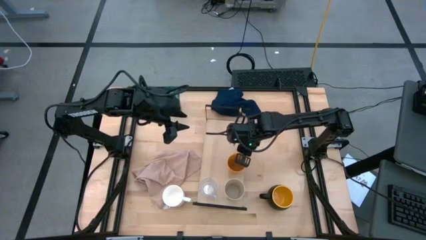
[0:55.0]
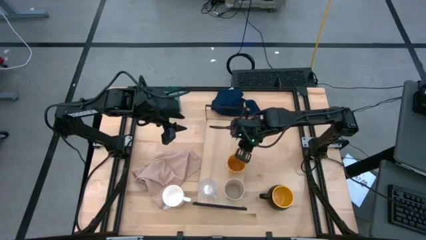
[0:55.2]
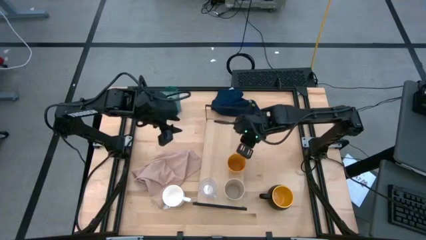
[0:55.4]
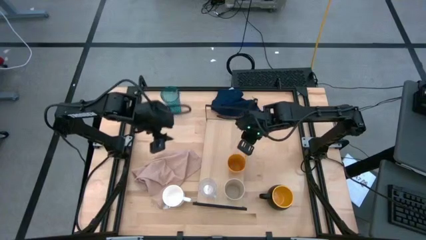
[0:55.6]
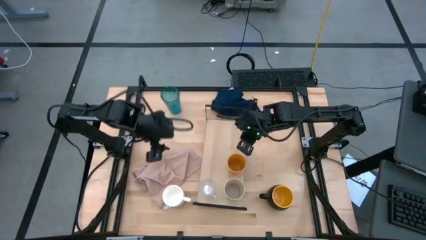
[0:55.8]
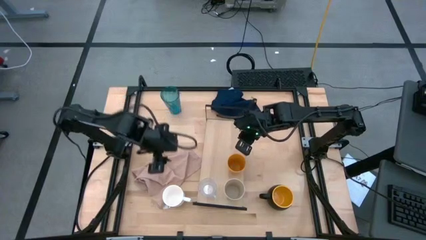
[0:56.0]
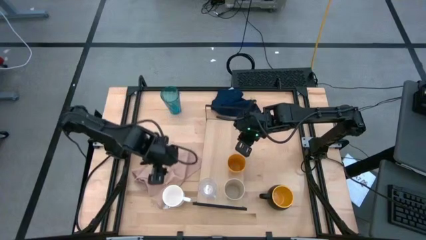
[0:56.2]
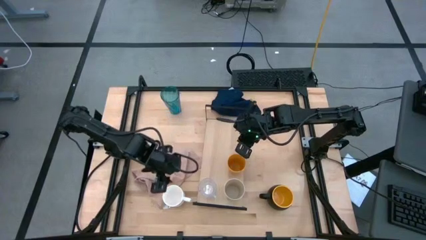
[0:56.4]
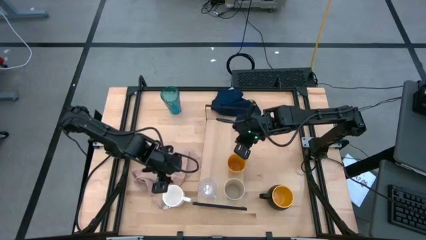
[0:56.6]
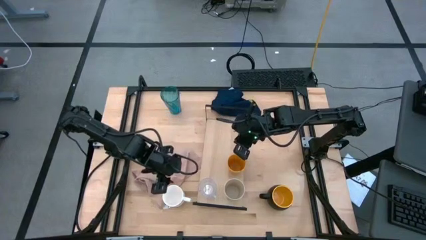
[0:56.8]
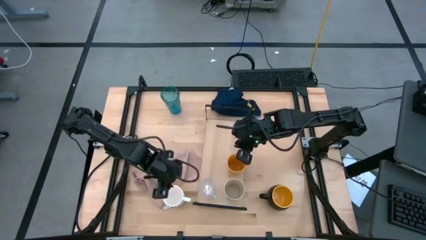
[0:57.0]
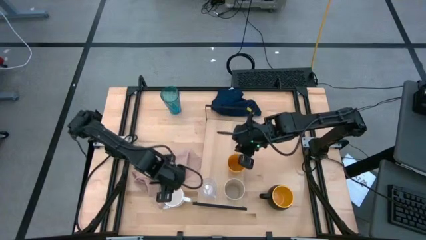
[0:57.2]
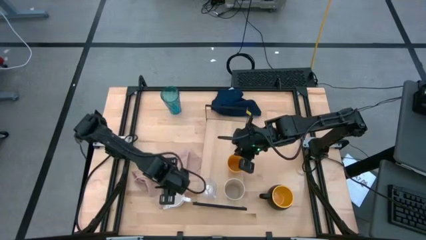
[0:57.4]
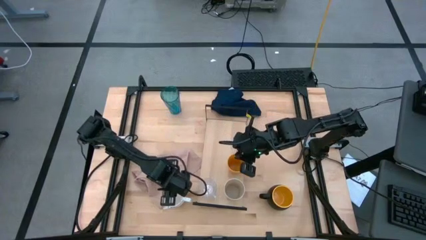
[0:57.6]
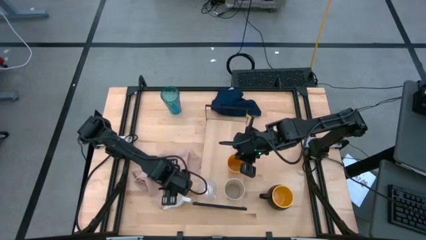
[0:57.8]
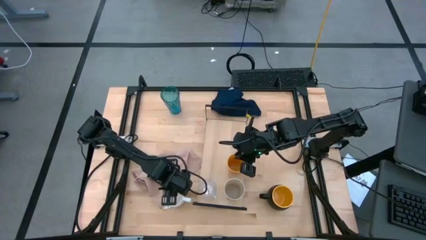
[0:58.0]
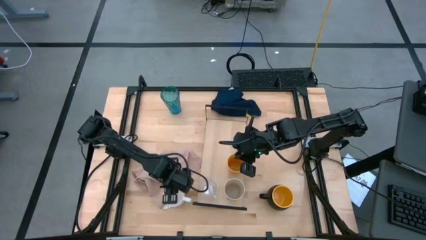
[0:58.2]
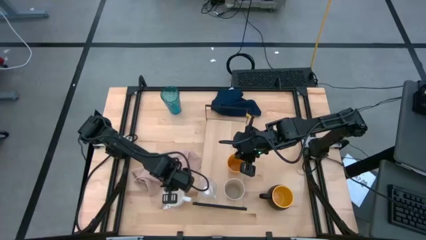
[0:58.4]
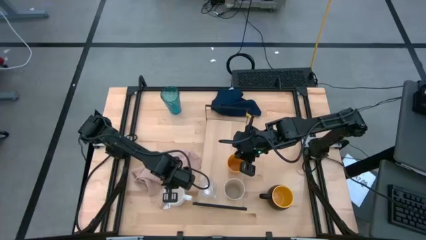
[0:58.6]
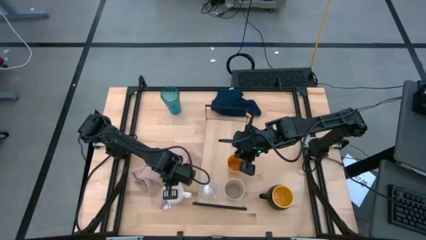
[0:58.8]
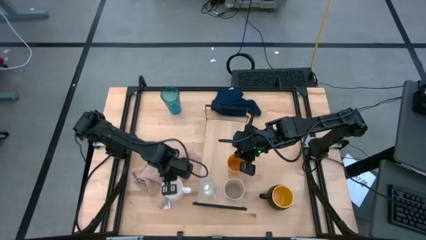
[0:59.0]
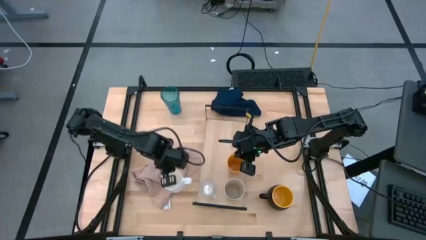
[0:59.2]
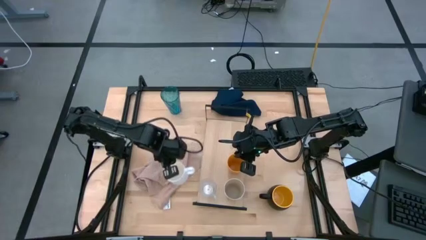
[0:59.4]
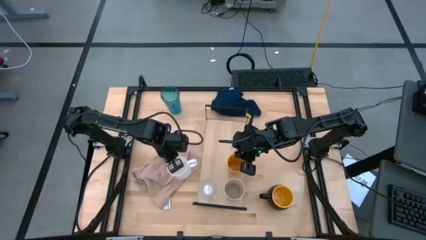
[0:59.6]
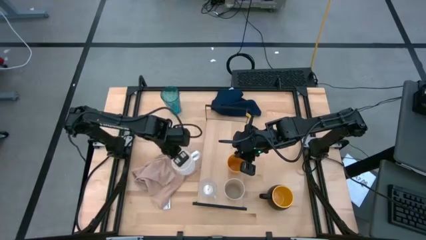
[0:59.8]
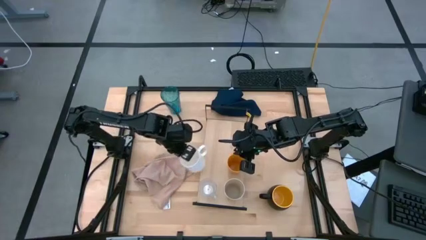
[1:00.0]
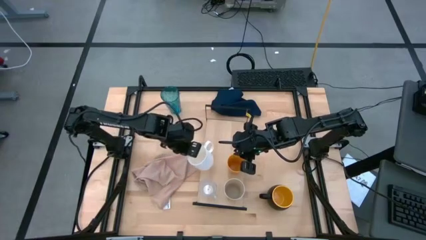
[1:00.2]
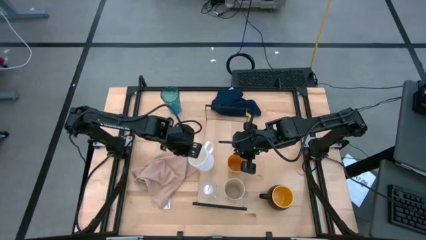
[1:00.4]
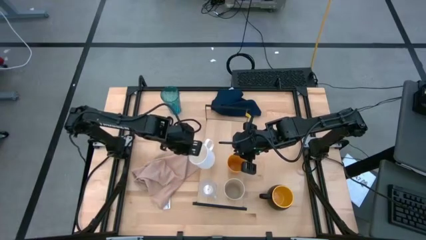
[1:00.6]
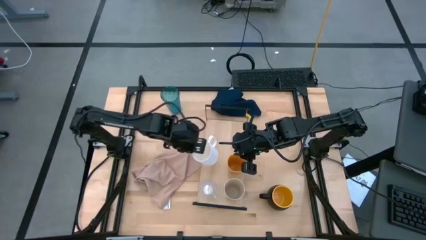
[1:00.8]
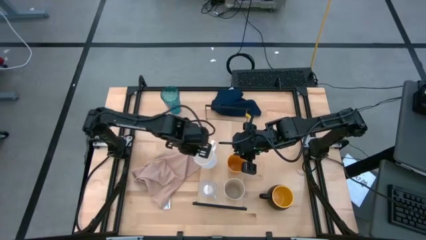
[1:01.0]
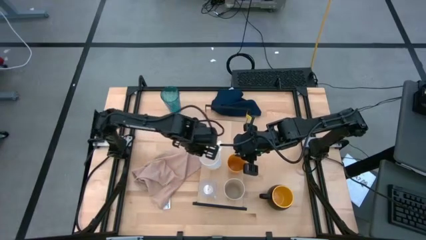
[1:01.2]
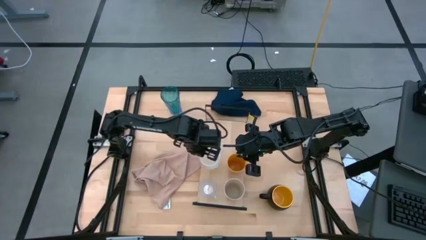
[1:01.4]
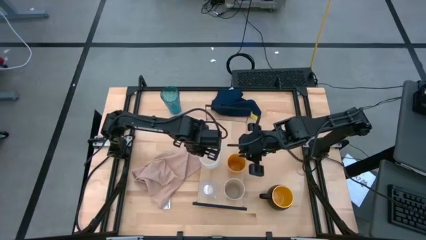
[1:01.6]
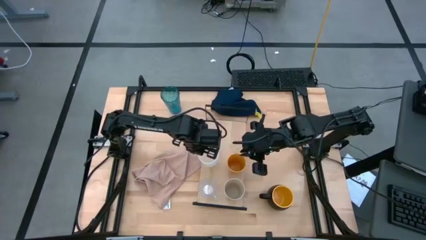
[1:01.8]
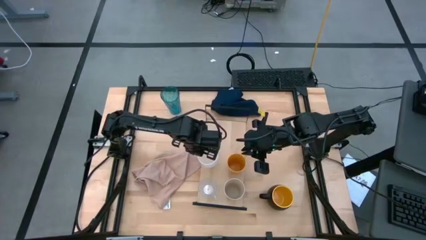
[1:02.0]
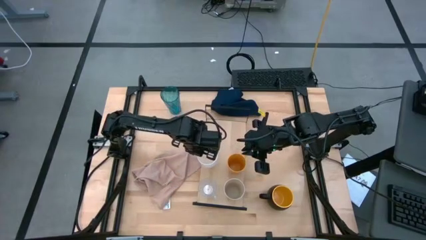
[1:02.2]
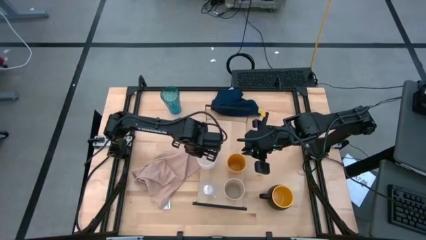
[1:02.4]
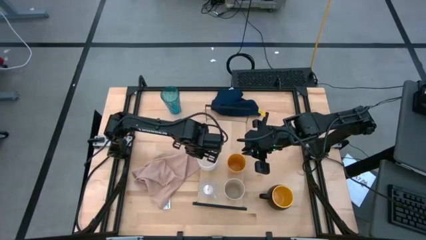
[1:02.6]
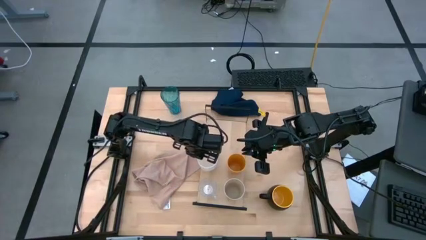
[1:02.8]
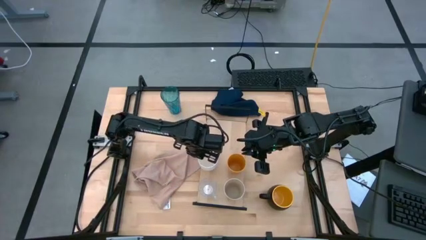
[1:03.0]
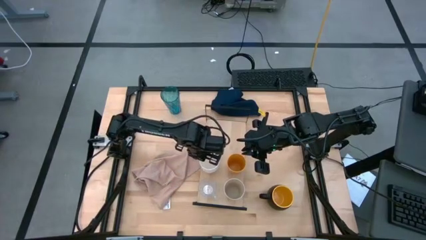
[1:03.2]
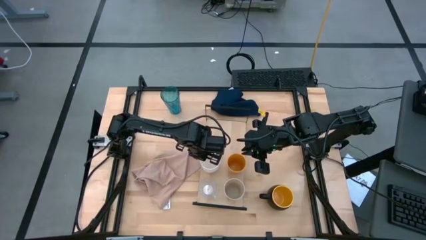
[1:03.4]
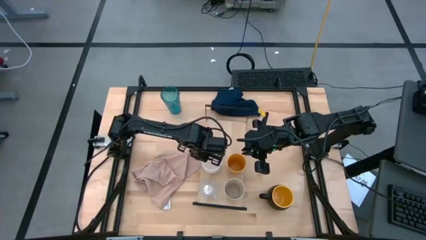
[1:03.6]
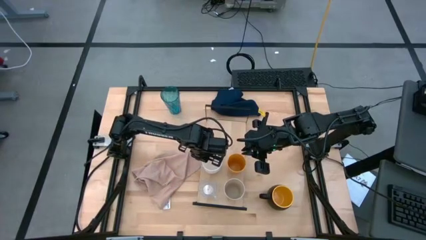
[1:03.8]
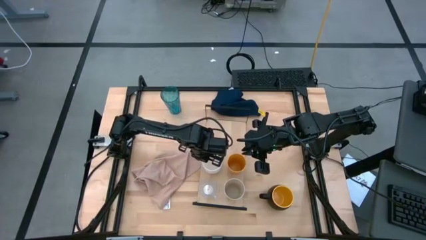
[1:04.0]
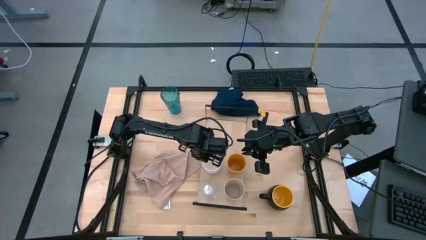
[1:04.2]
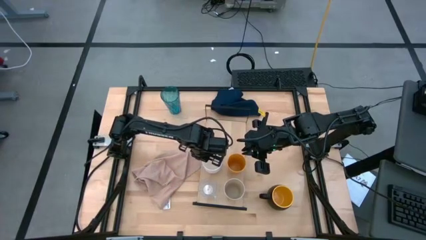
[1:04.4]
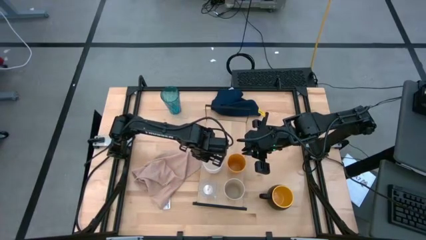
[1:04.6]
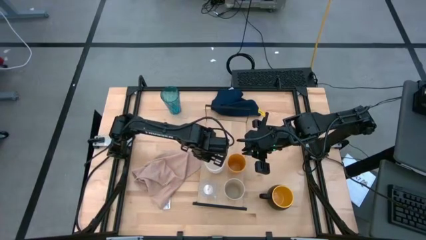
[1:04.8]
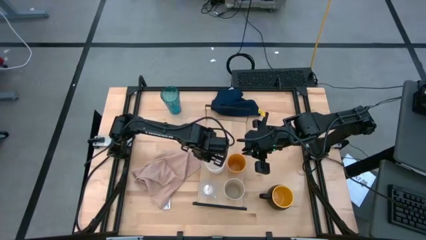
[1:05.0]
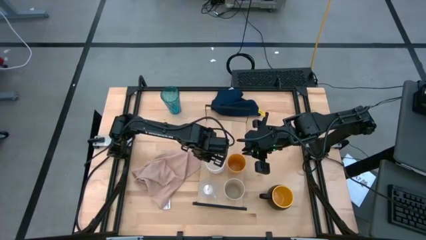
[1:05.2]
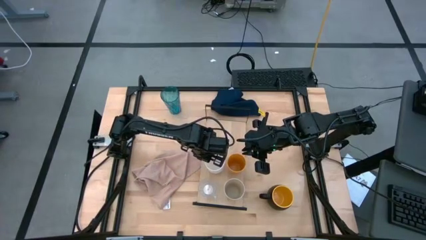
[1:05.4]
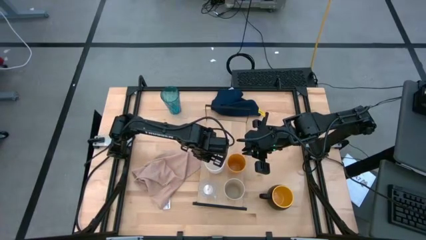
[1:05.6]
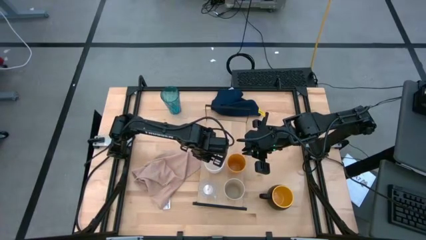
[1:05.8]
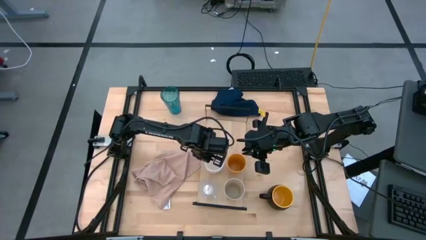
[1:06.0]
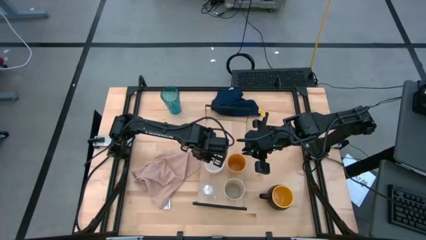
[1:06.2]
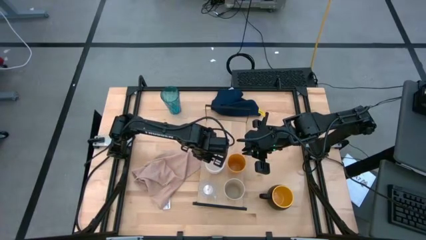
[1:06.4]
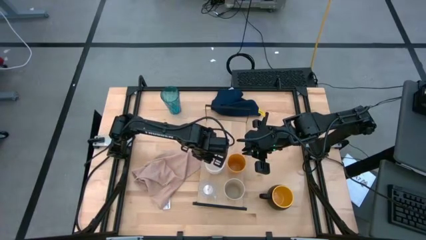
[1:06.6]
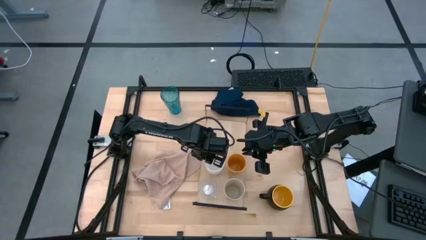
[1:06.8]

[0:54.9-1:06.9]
Task: Stack small to large cups/mugs on shelf
Put the white cup on the shelf aligned with the transparent cup

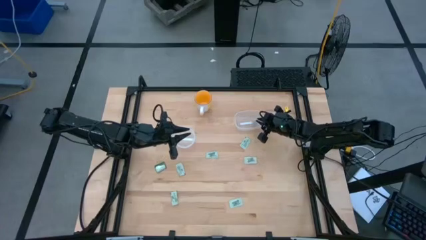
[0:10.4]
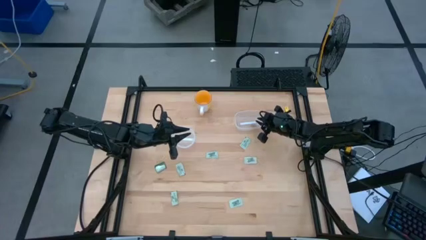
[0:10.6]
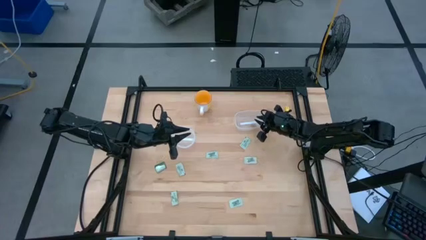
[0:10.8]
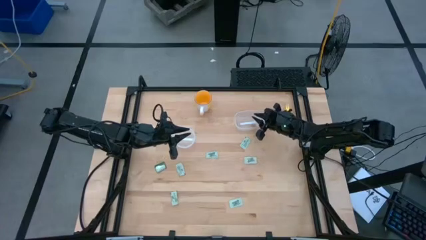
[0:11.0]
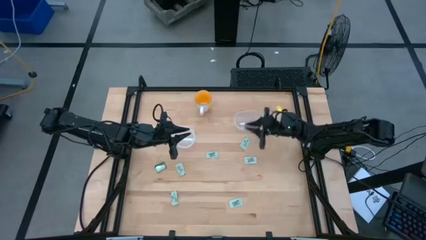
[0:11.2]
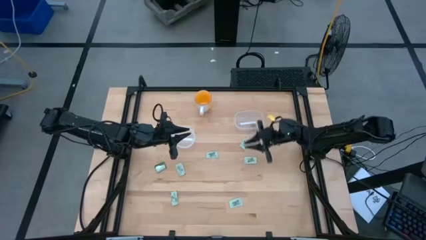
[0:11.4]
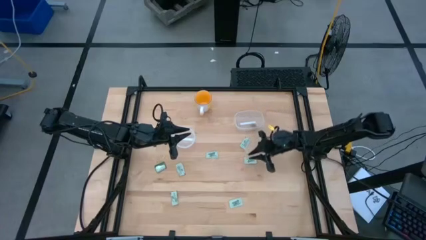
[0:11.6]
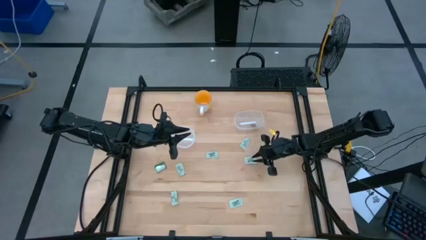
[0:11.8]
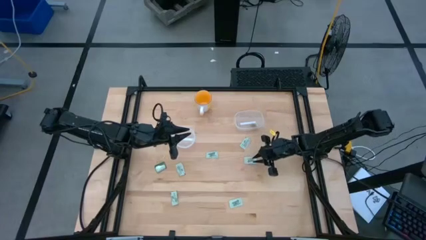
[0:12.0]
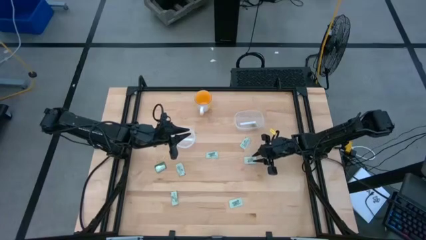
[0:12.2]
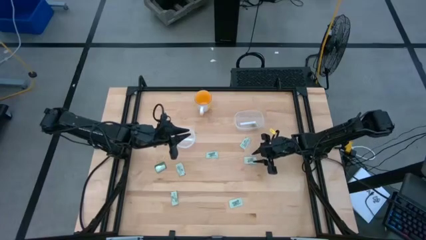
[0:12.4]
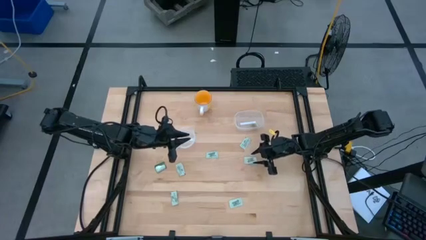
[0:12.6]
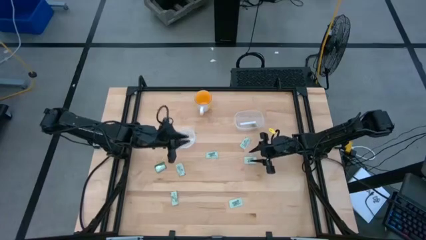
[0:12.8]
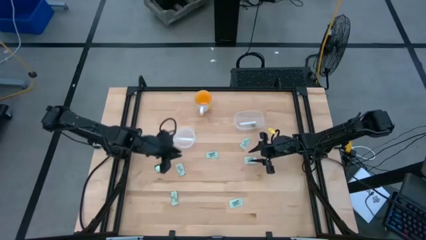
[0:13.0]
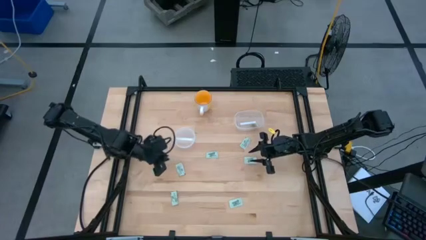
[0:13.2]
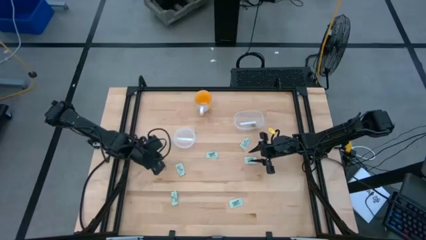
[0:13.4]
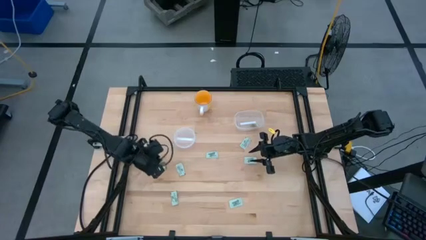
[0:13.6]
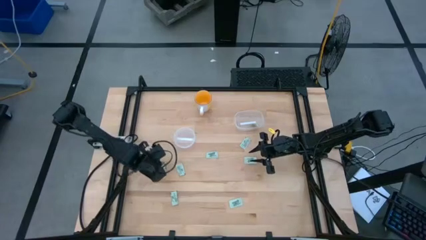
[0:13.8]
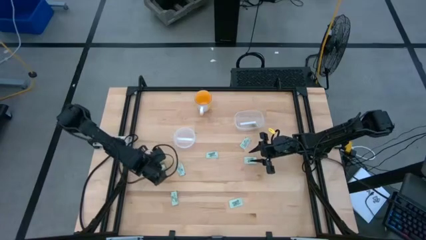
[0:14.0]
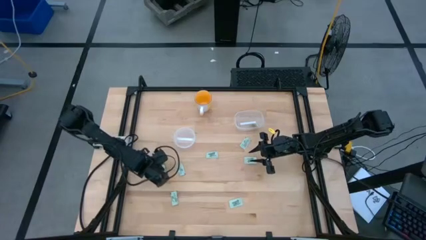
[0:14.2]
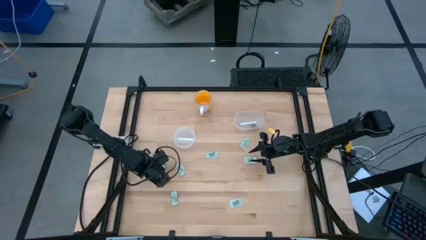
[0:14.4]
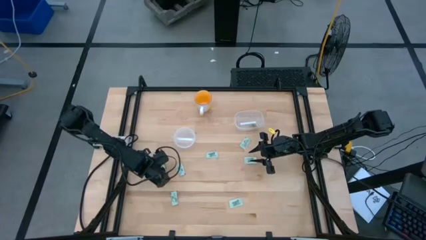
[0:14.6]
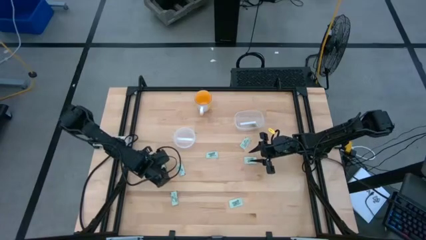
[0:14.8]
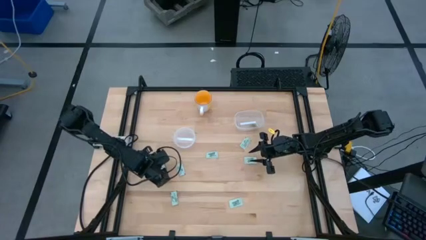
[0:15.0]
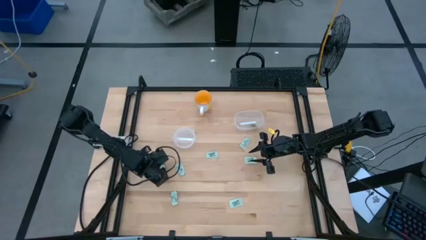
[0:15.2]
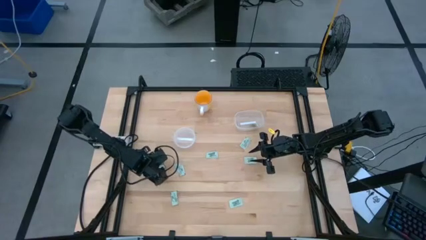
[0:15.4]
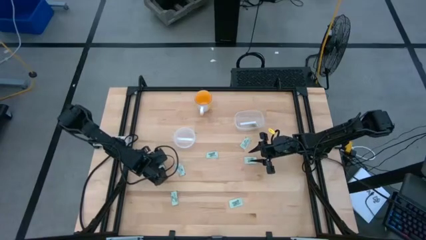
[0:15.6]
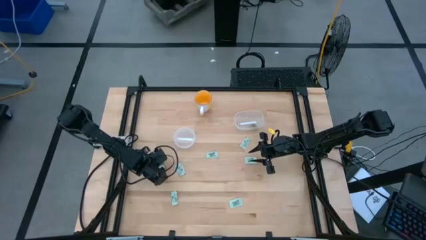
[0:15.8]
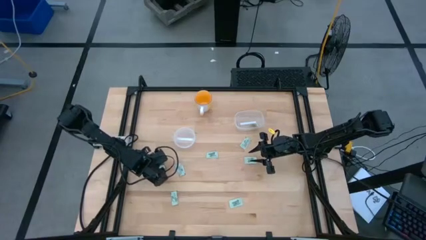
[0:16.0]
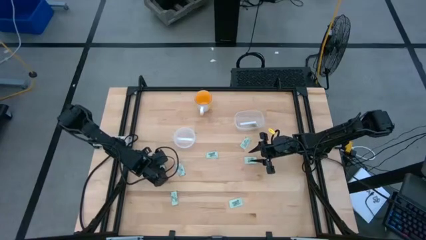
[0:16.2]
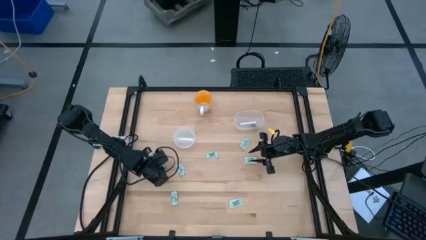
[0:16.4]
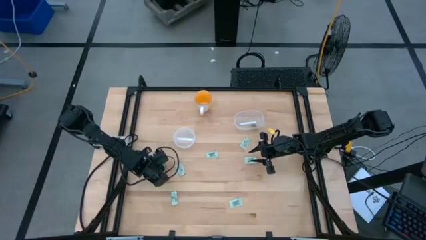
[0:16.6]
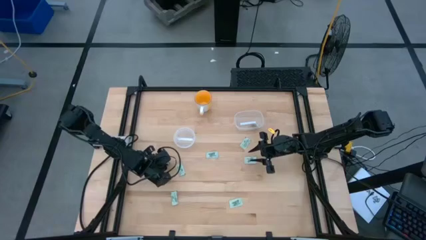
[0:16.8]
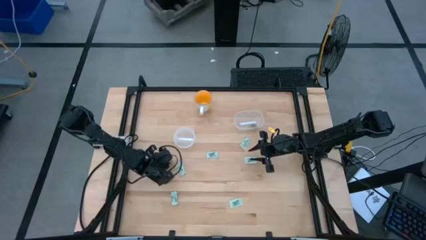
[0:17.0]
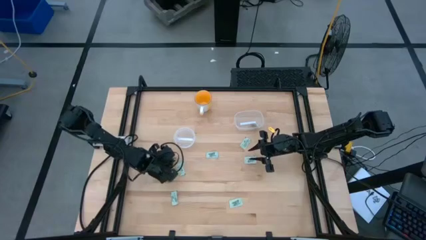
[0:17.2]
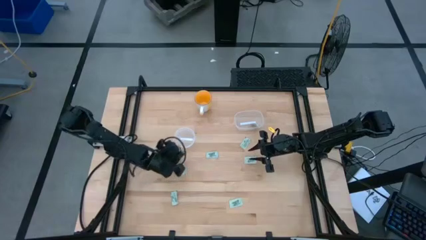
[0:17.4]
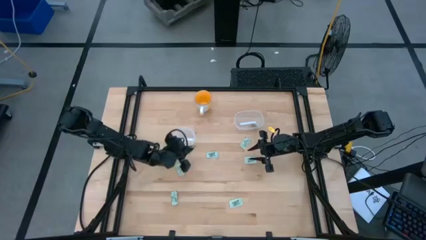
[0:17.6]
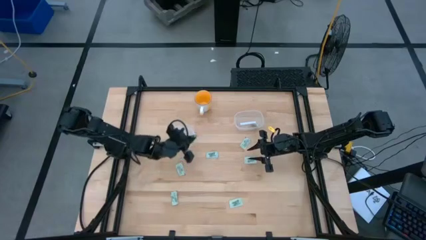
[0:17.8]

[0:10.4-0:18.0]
Task: Pick and place Stevia / Truvia into bins
Put the green stevia packet into the left transparent container
